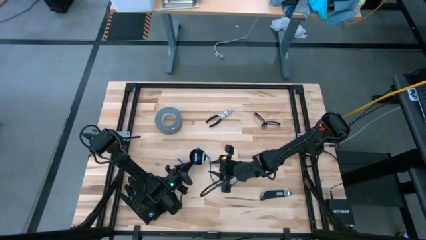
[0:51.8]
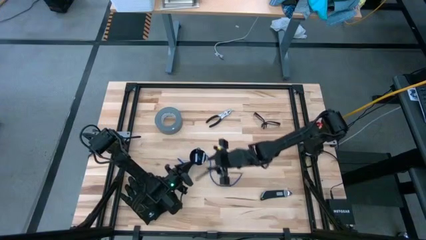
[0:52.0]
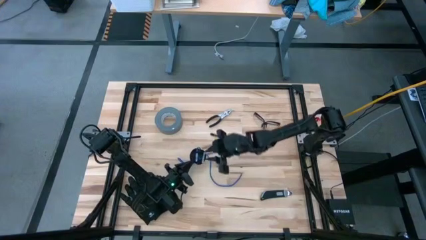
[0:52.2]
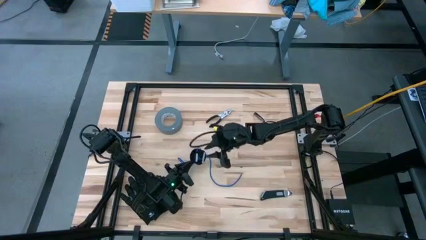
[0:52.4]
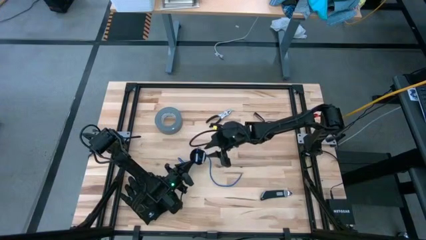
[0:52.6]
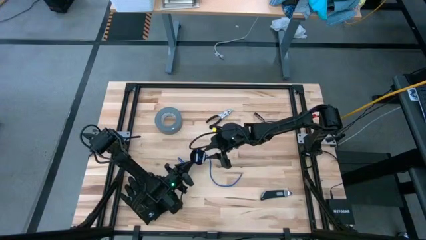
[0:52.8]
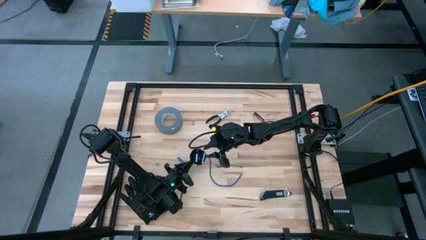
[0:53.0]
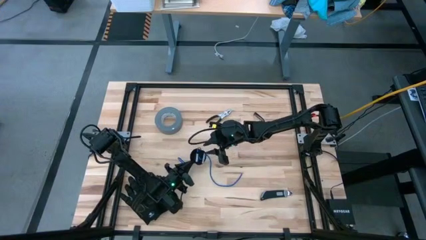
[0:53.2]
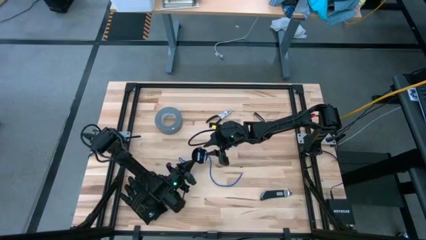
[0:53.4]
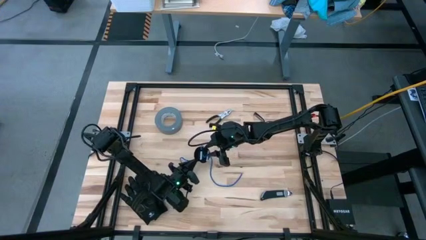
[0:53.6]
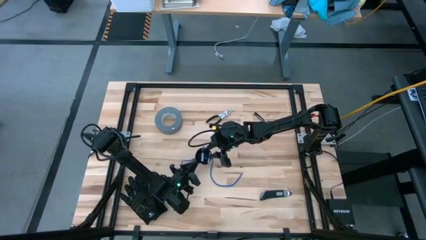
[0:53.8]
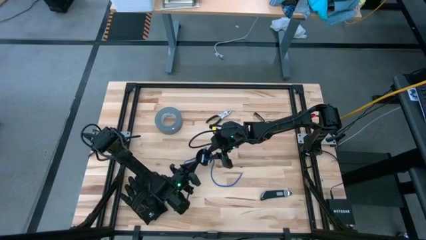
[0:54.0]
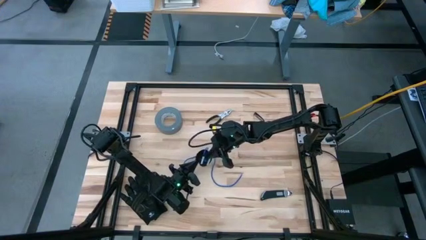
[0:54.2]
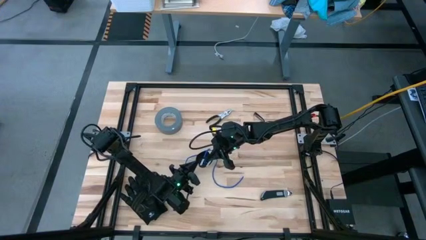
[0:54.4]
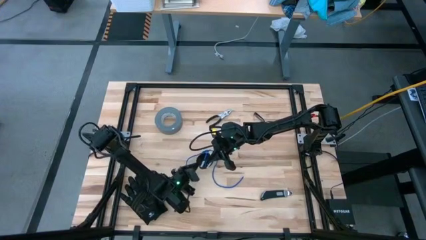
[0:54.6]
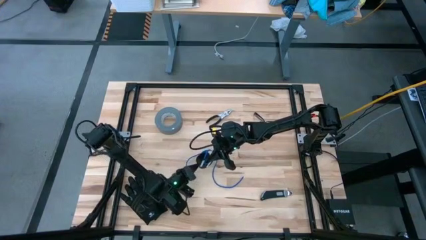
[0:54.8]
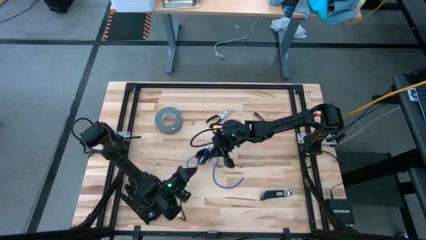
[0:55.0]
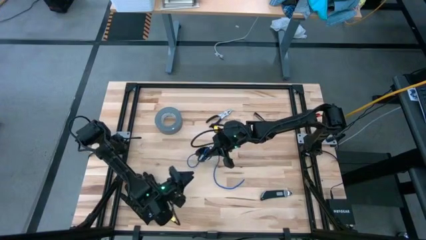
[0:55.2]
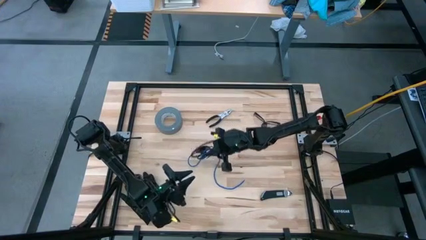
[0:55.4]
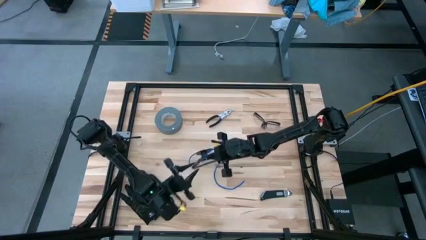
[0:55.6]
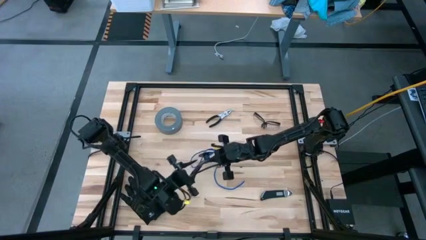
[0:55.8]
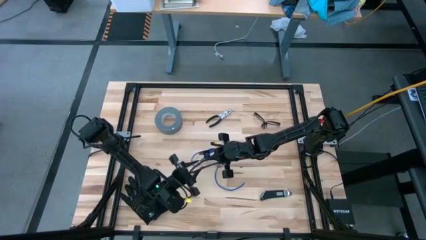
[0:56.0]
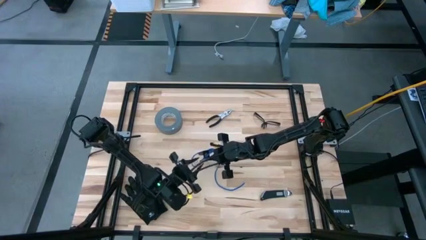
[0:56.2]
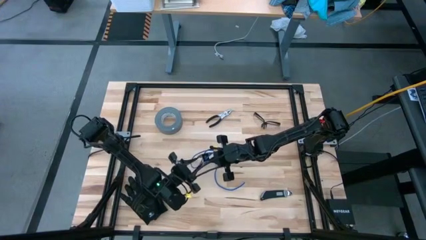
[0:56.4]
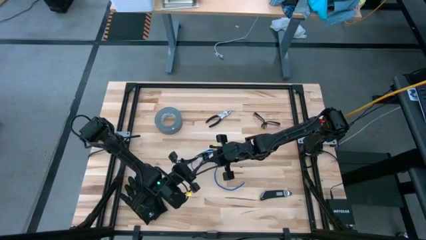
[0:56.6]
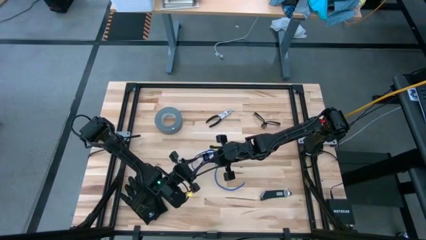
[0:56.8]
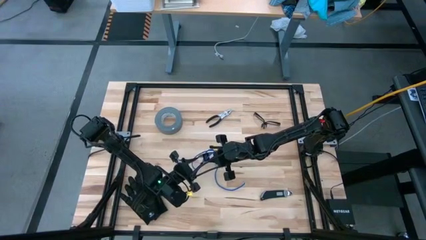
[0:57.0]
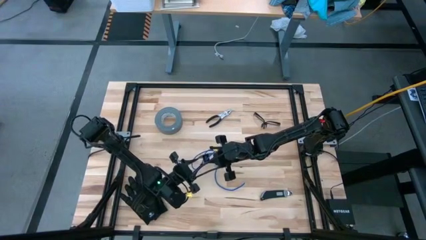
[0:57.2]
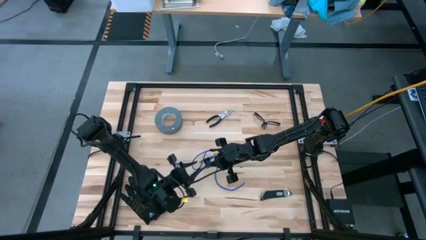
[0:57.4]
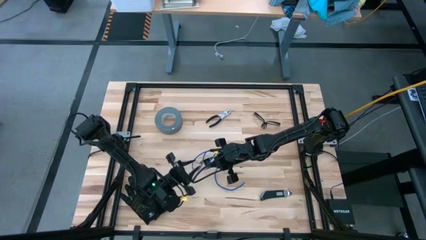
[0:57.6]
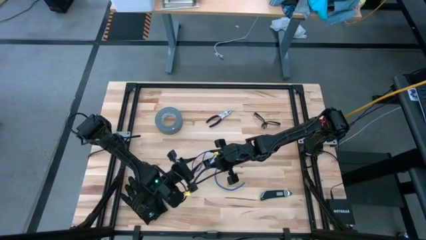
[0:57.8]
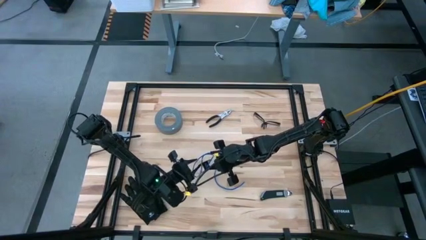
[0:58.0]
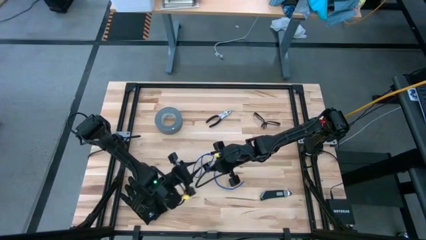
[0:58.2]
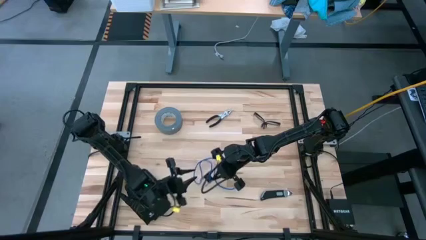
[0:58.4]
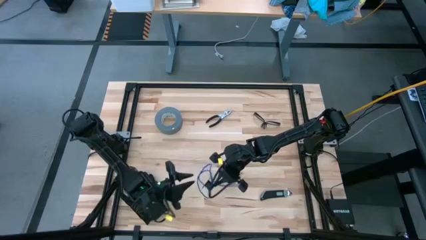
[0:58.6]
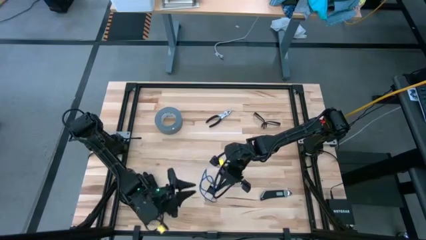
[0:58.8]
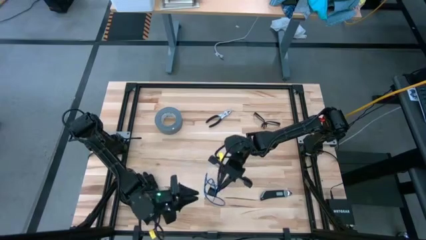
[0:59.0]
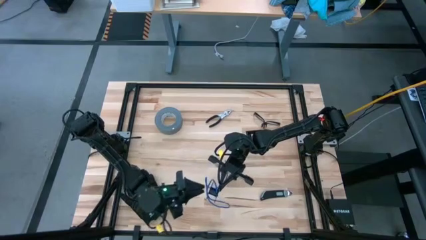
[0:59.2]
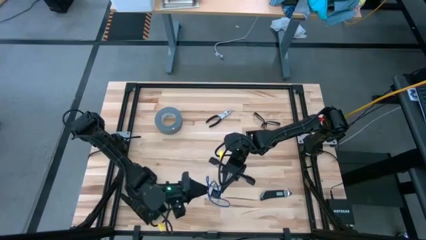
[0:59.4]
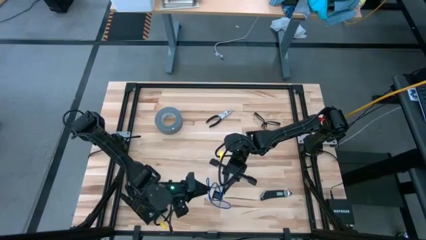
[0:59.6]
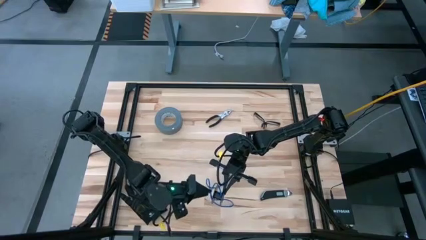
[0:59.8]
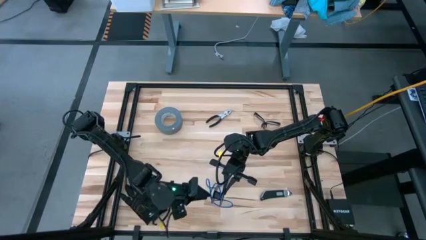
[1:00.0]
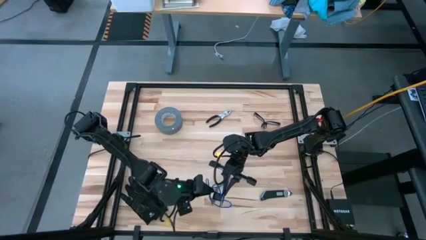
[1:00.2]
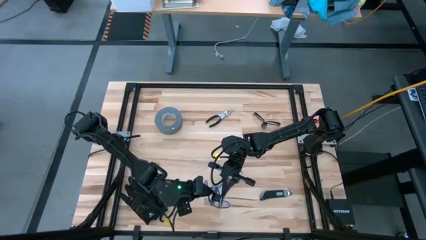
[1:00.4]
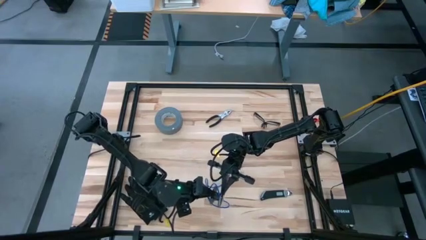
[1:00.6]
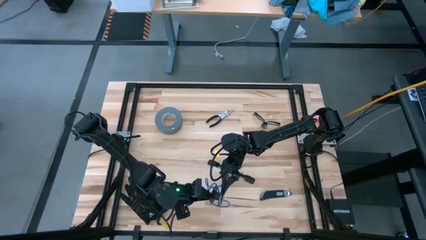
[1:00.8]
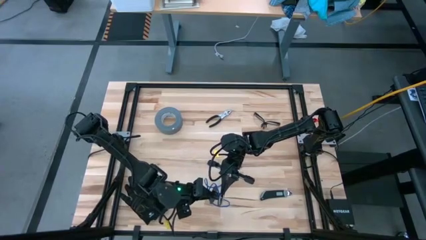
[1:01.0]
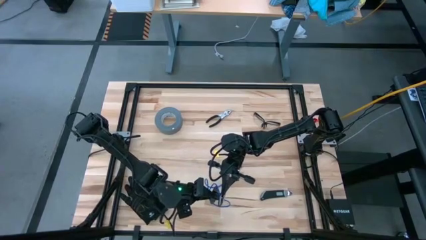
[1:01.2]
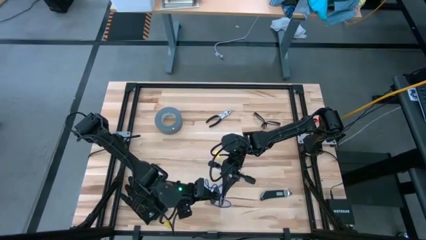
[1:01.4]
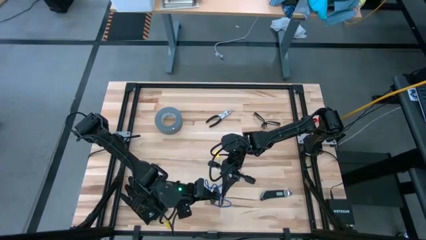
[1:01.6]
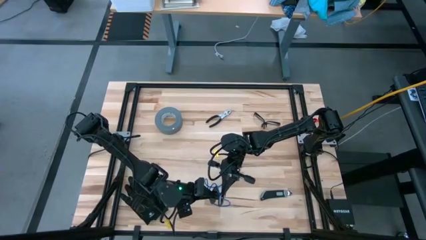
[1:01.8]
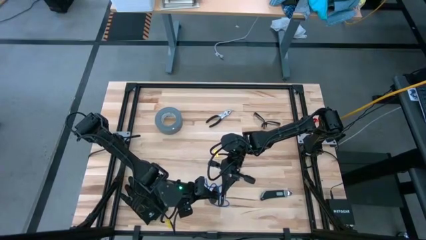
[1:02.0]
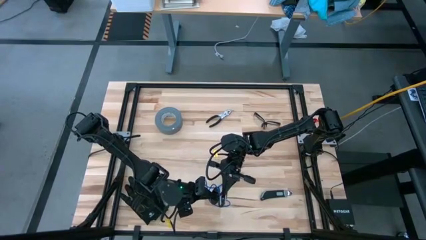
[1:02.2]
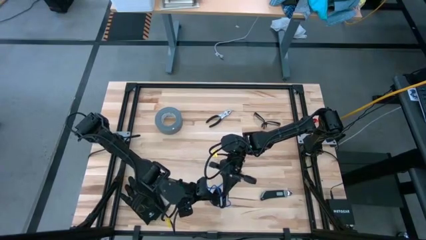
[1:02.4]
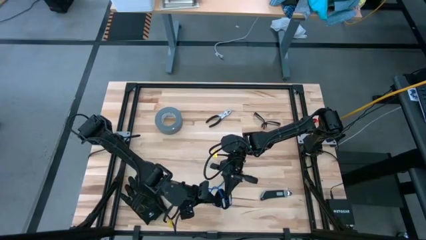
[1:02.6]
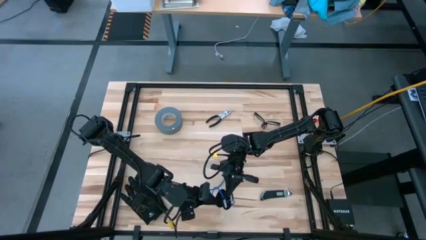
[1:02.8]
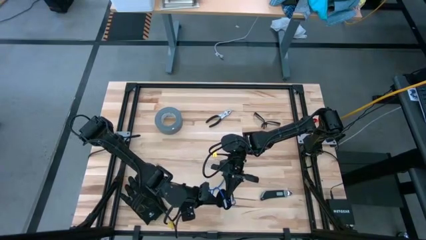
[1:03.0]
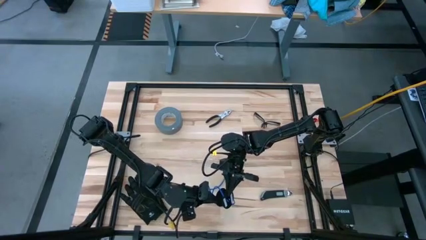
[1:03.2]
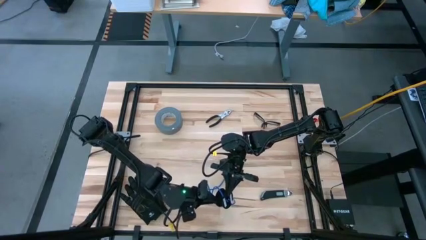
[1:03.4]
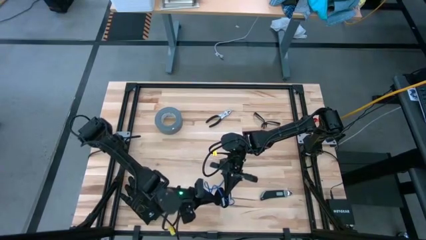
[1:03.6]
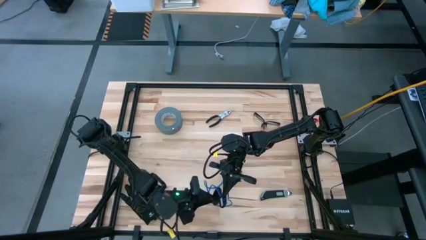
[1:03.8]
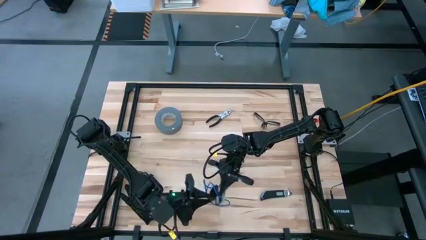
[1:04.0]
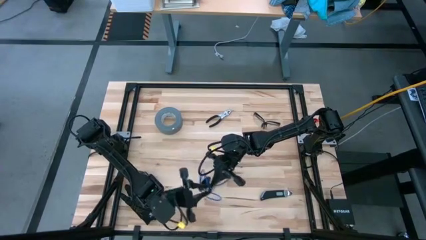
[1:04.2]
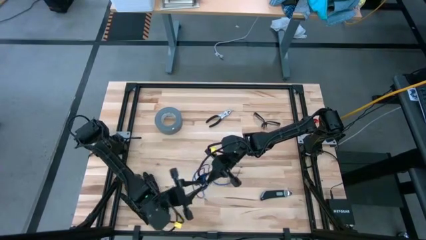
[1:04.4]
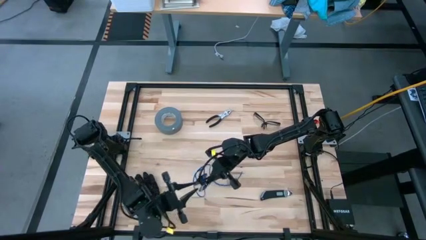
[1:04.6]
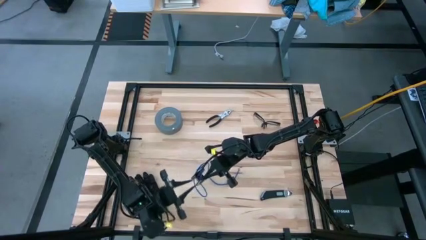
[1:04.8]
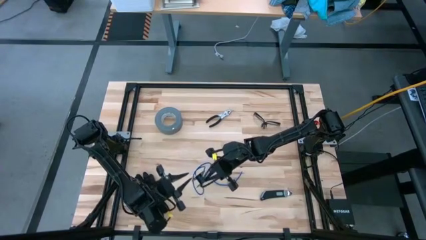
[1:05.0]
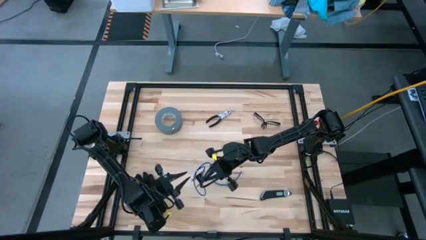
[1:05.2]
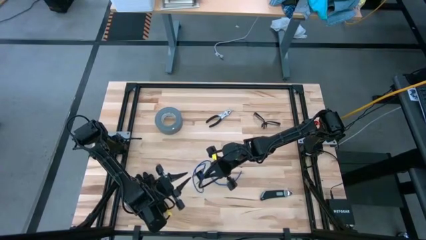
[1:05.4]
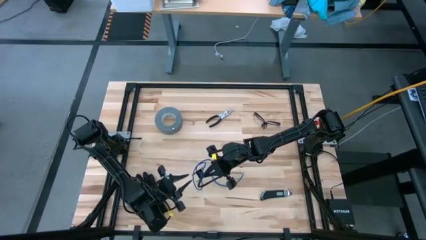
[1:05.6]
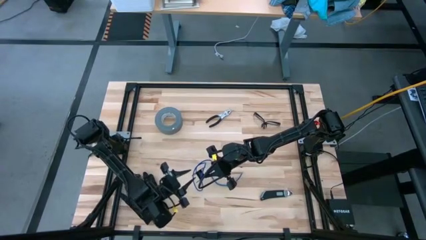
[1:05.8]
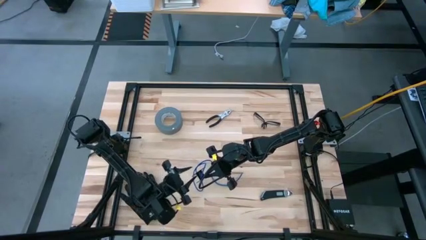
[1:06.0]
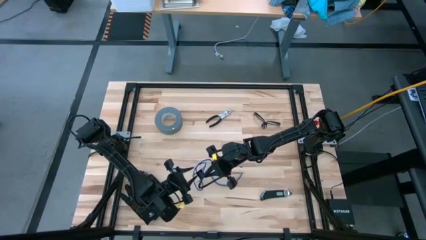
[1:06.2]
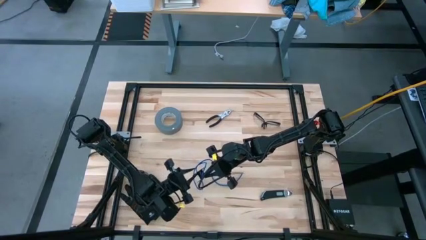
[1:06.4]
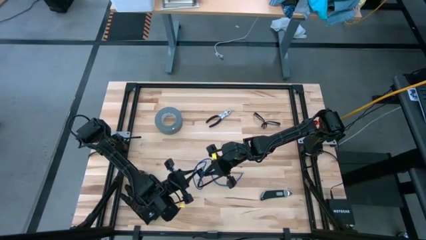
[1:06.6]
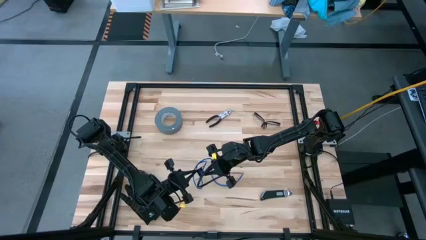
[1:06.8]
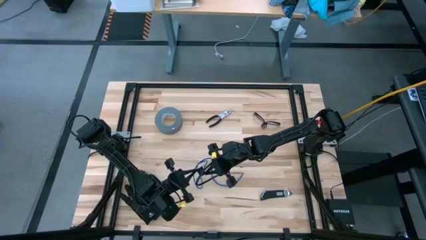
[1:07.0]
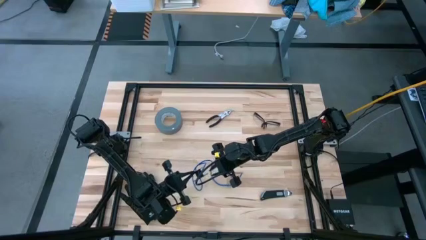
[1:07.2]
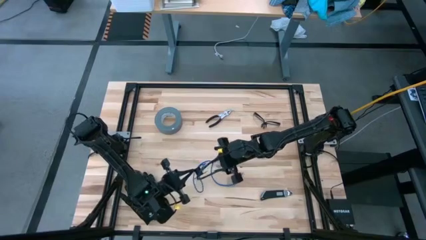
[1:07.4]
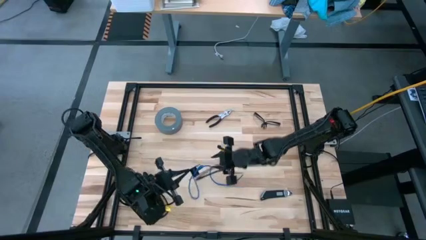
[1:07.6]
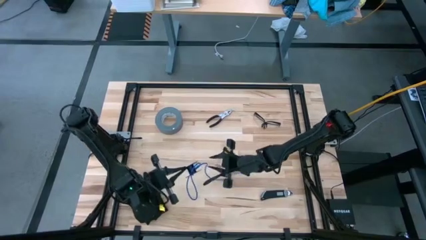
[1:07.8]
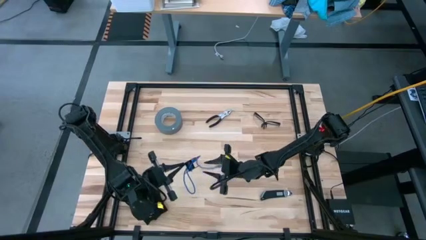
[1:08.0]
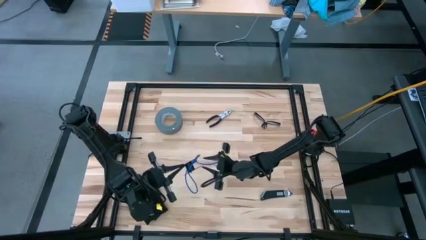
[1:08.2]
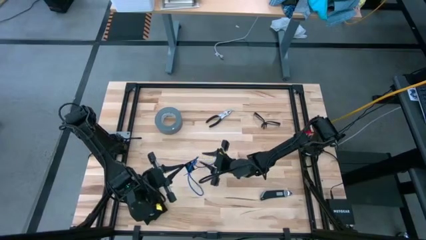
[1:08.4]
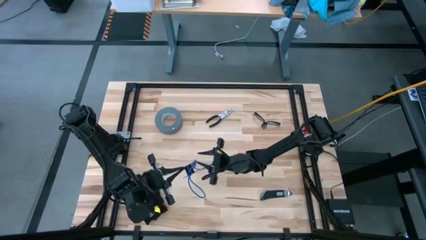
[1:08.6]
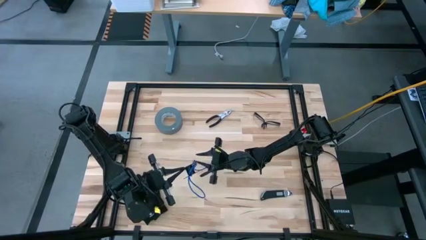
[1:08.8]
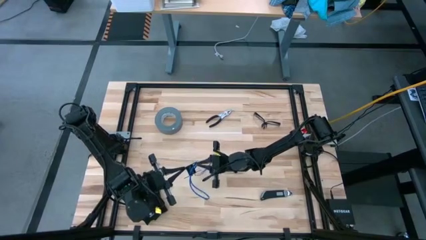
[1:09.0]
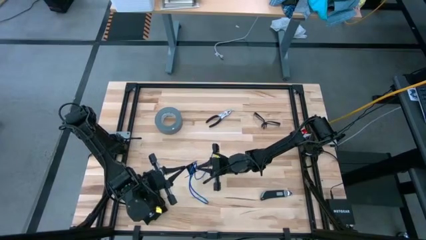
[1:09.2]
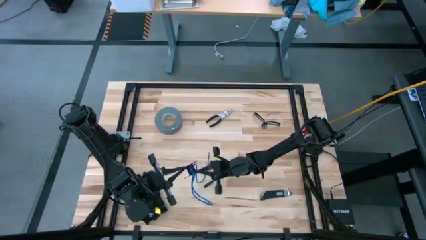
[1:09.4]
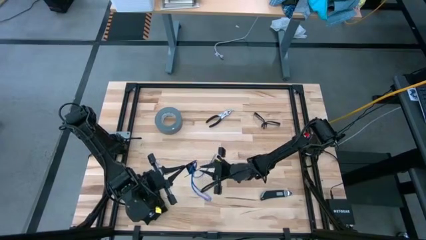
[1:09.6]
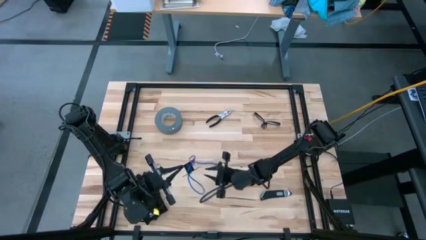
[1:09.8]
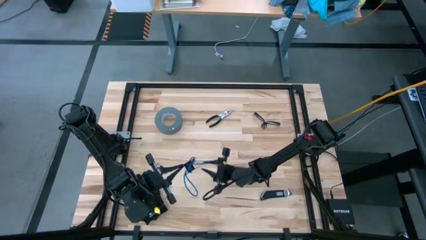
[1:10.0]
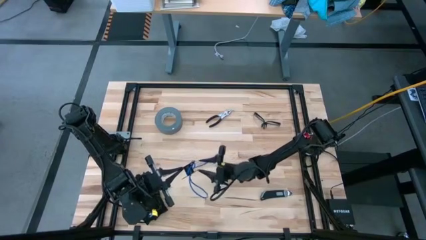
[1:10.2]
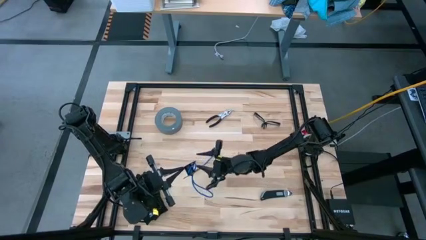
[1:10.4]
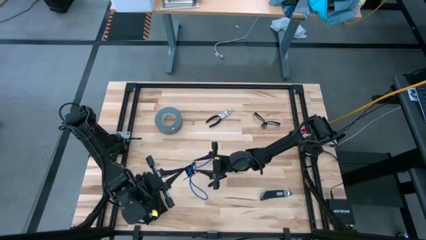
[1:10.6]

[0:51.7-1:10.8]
Task: Coil cords
Coil the blue wire cable onto the black spool
